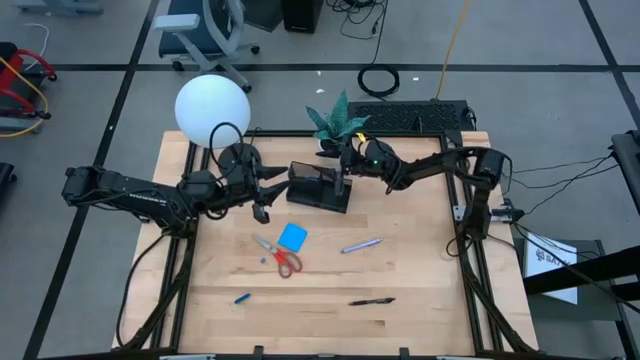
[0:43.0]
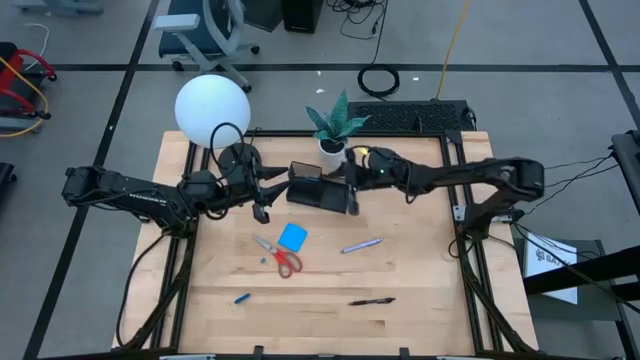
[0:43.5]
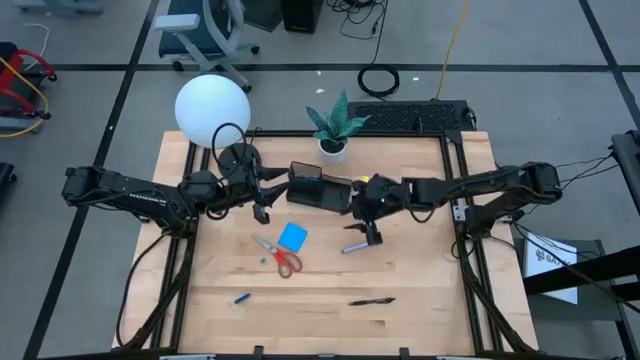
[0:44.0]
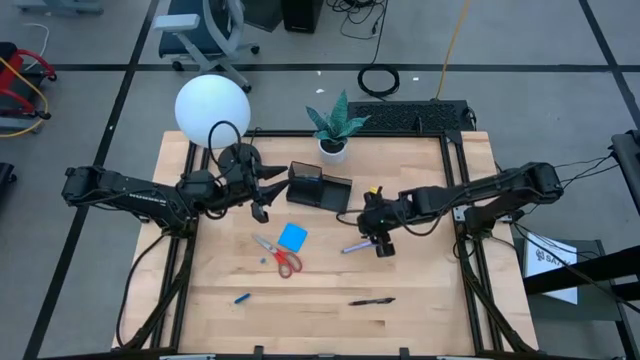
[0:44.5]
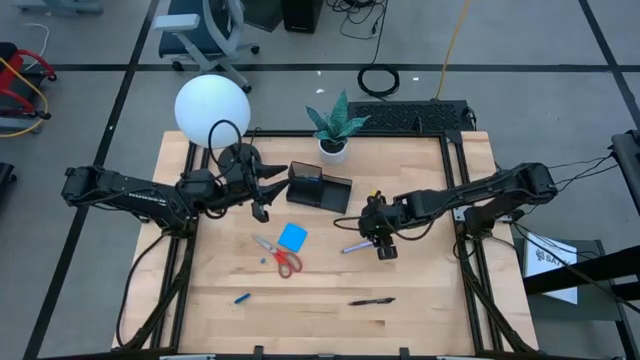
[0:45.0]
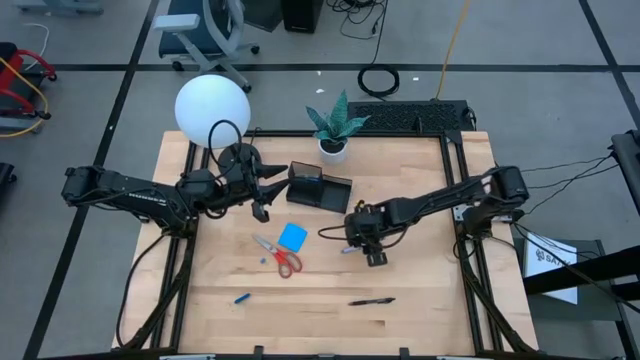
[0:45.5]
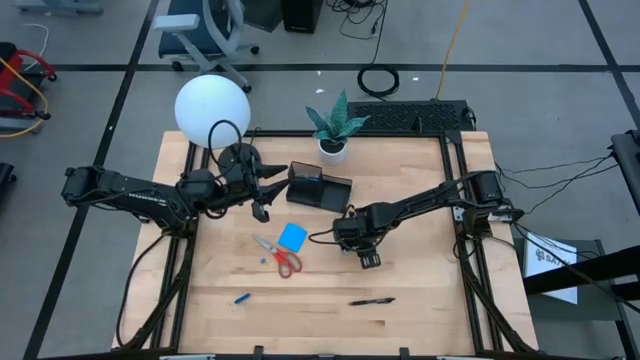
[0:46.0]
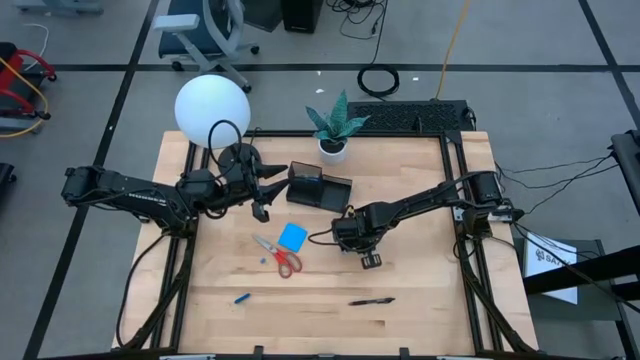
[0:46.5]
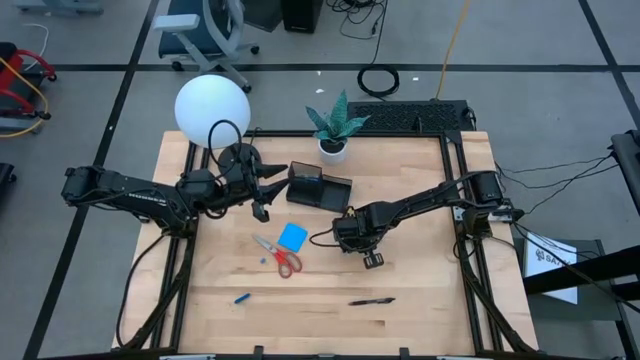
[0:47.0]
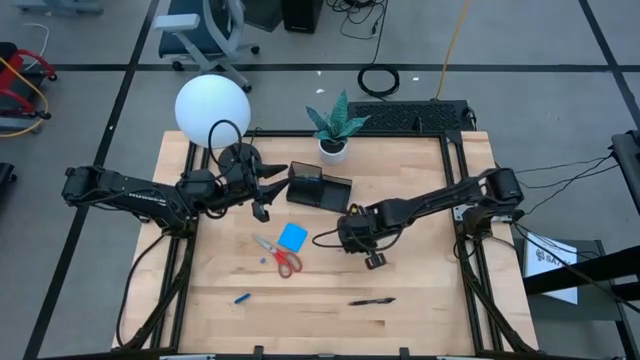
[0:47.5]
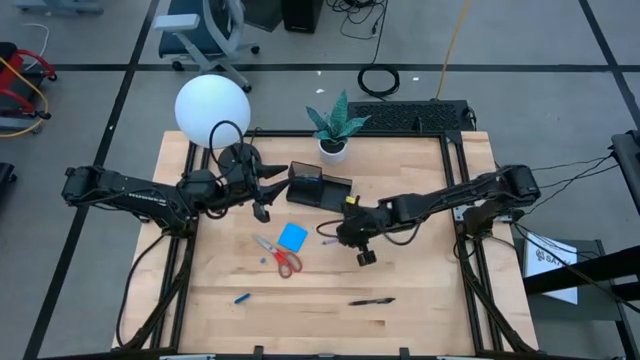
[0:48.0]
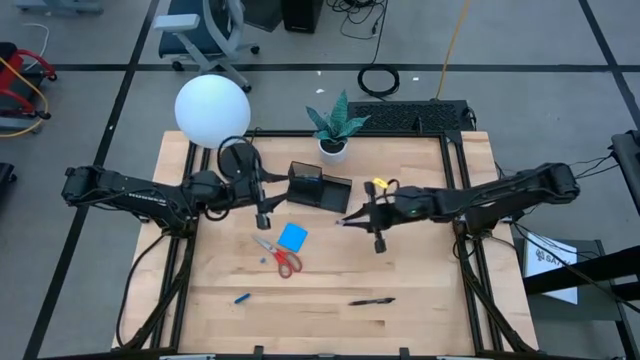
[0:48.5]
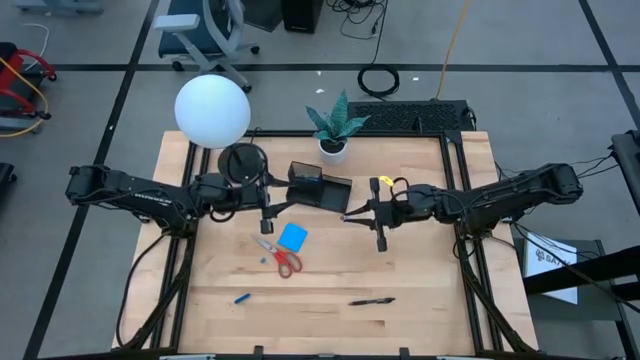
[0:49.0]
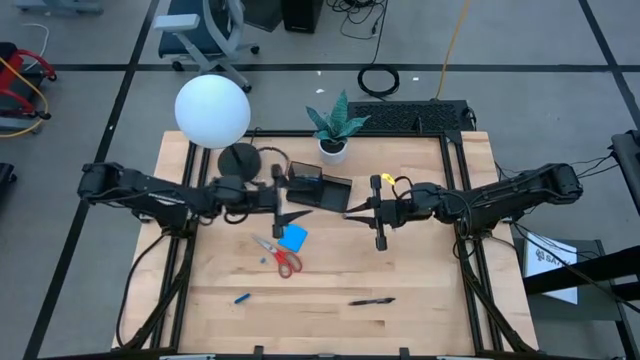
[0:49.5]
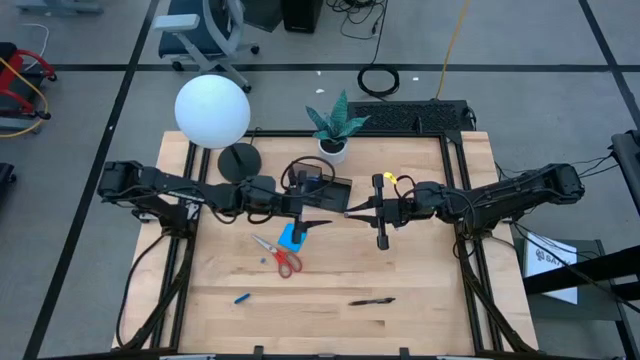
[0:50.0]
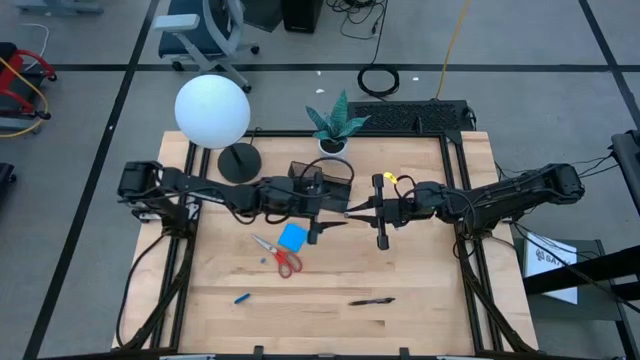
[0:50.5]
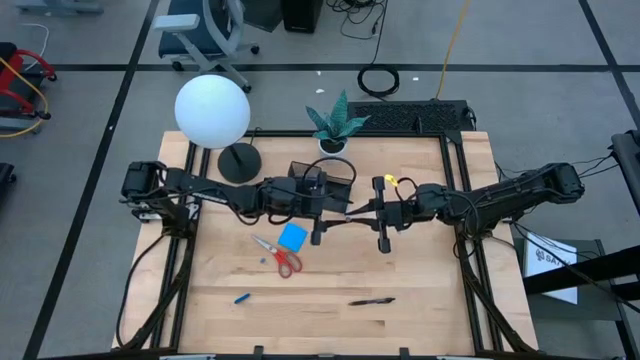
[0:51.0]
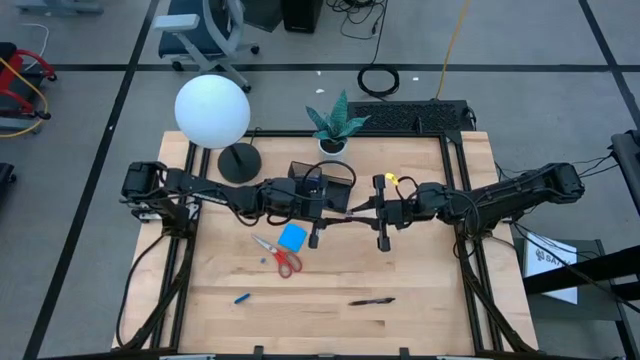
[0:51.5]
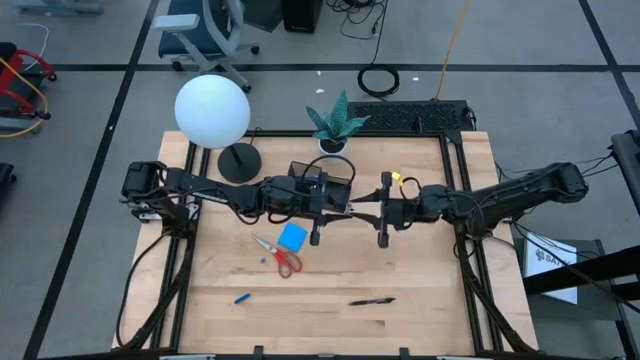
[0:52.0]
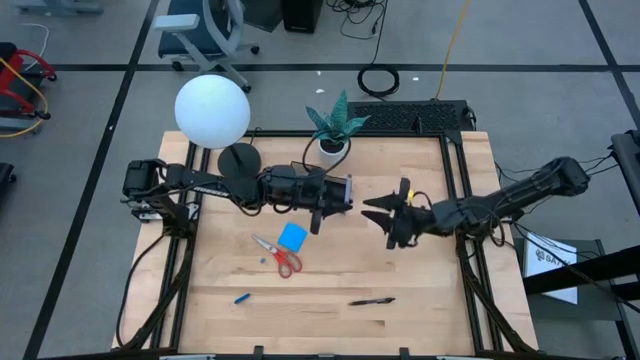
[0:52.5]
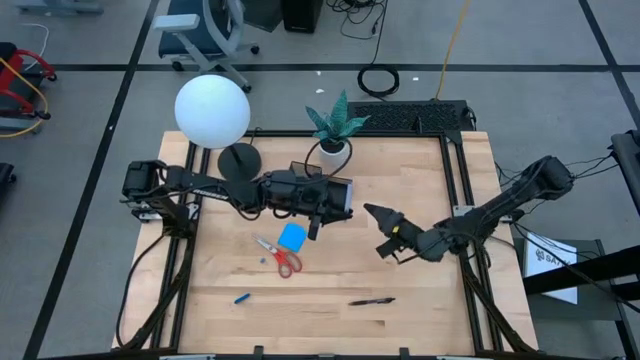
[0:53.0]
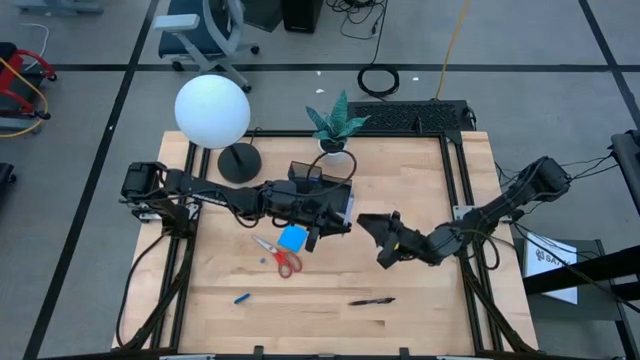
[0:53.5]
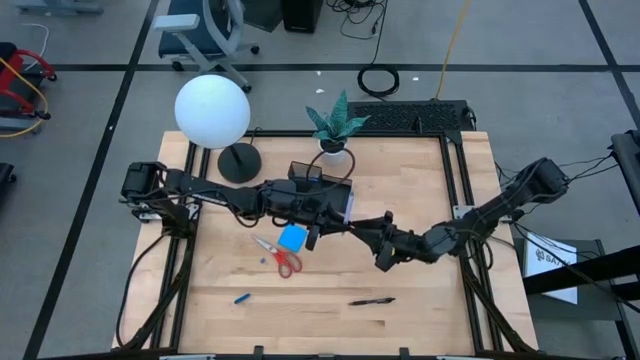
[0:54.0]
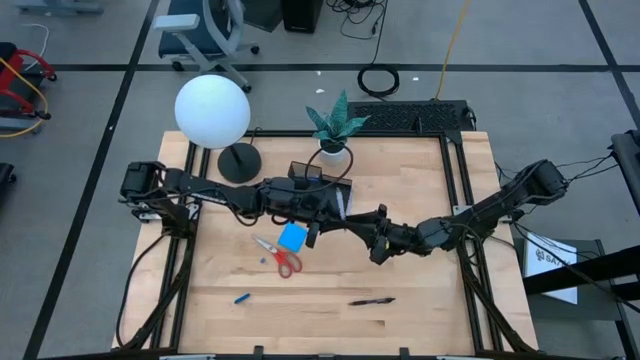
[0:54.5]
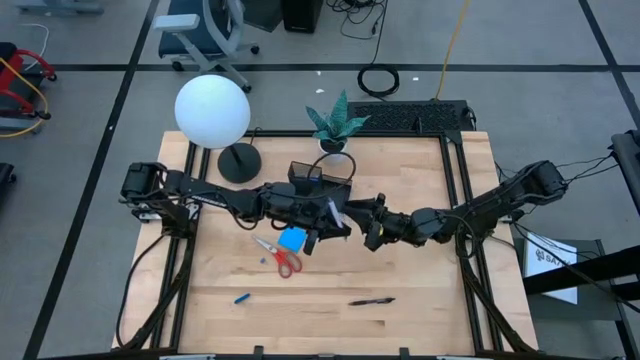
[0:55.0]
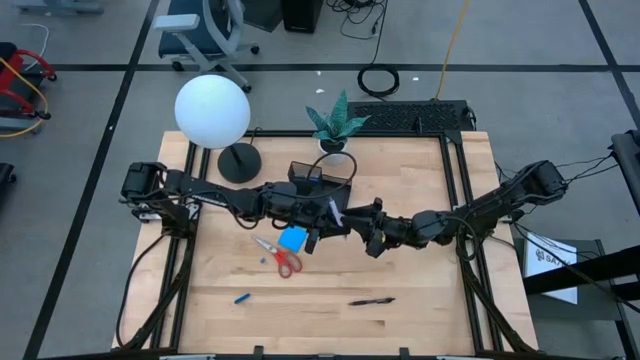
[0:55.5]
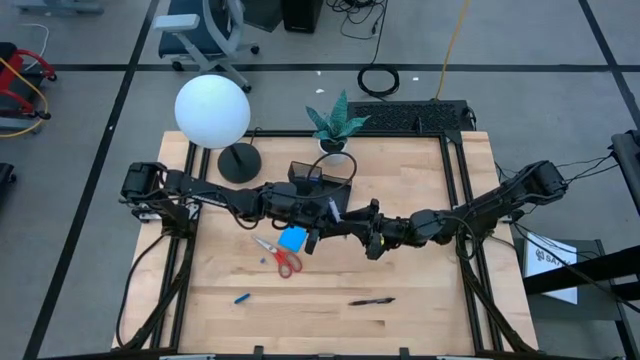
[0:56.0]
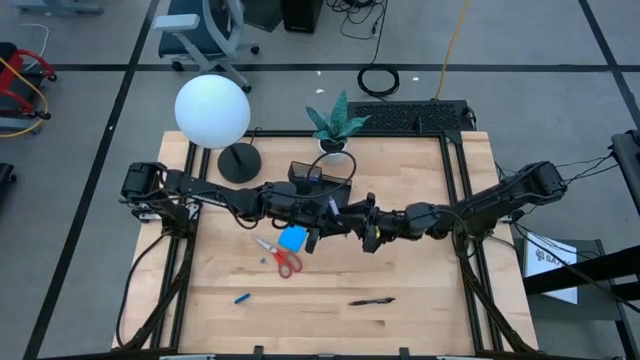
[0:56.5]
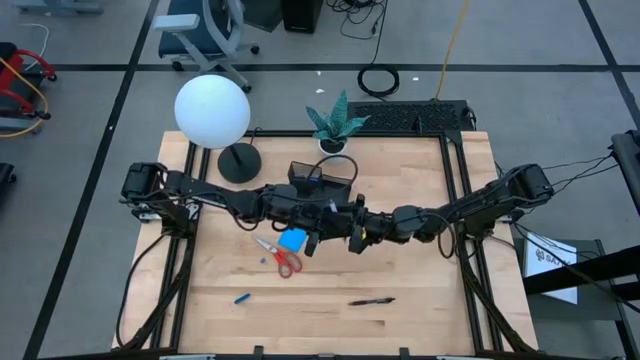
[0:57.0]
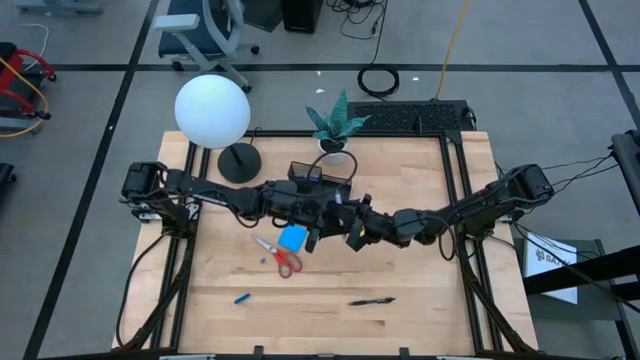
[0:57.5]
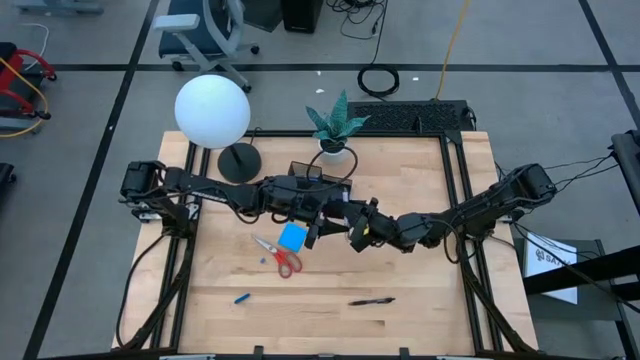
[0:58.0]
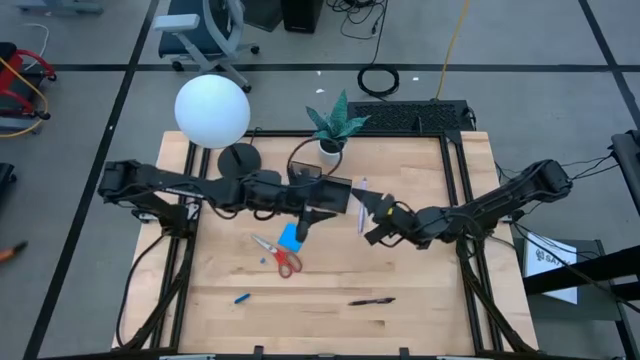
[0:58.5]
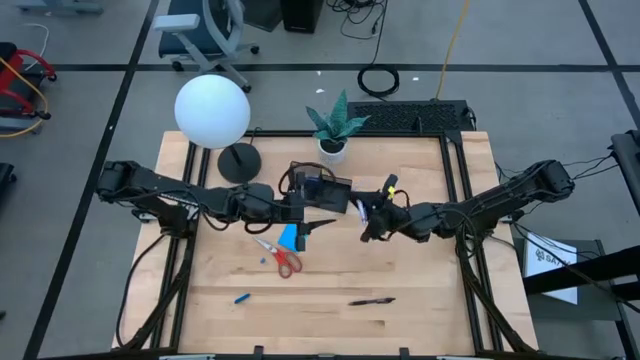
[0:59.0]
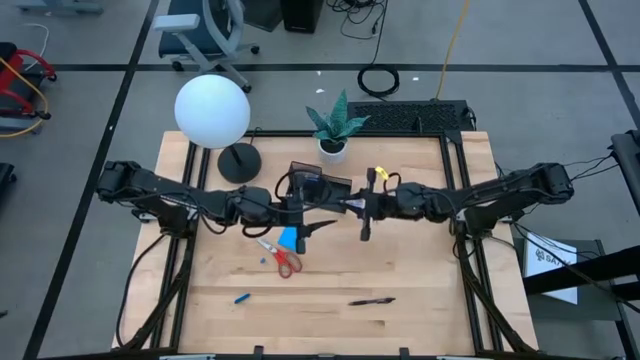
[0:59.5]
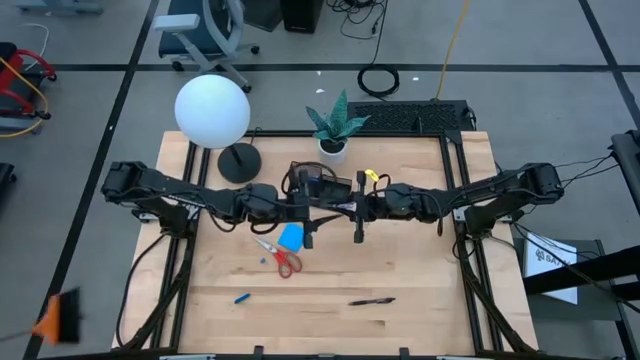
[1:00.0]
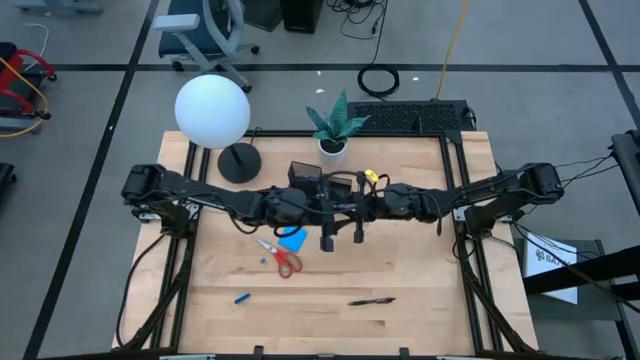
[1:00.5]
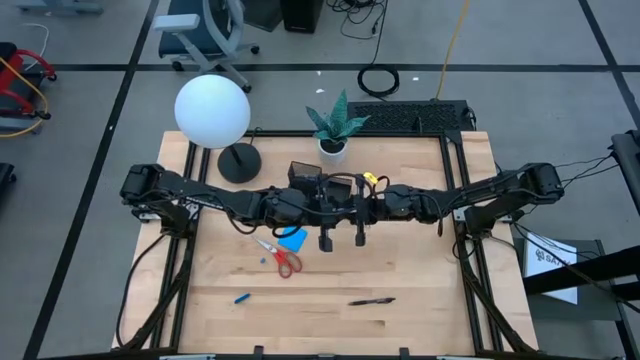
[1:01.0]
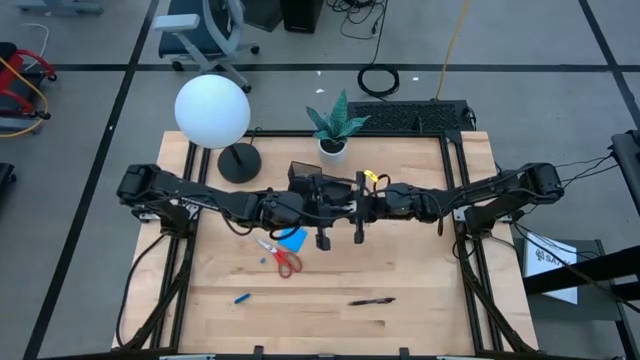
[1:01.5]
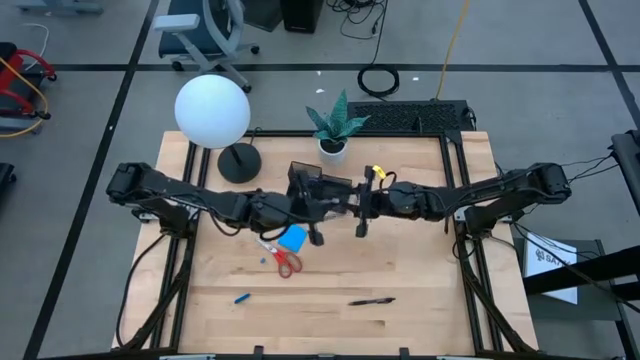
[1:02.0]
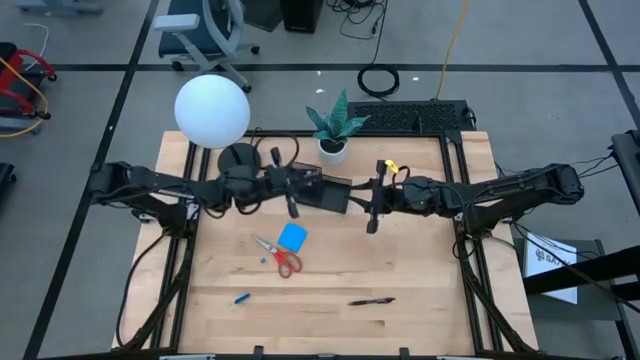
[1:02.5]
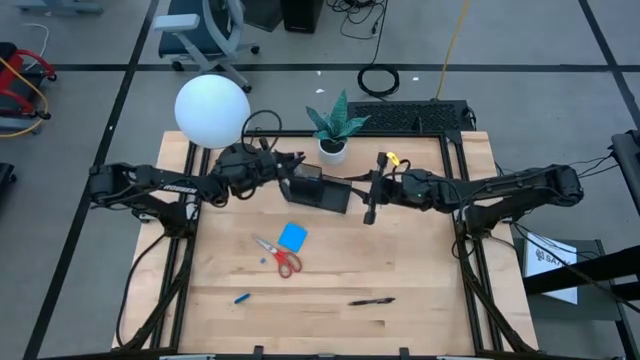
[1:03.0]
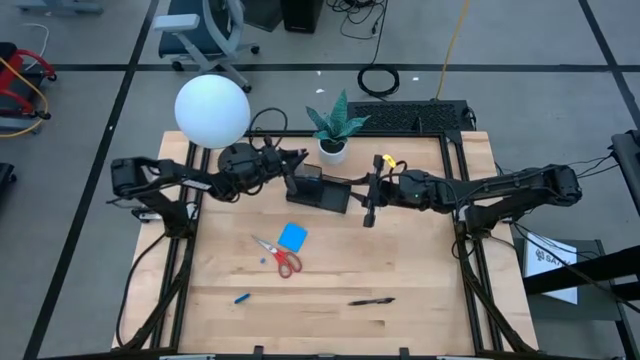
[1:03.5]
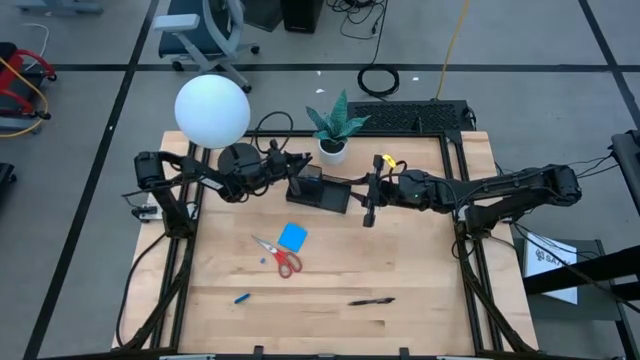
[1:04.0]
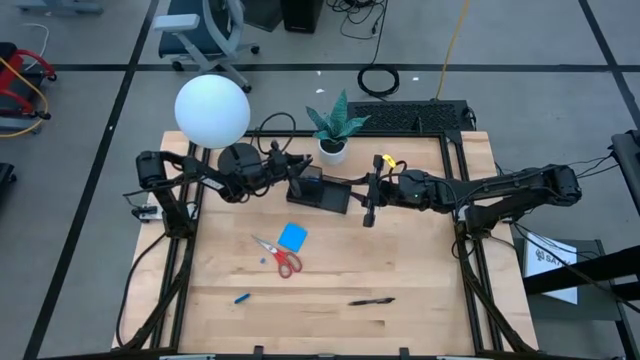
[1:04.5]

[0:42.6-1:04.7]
Task: Pick and place office supplies into organizer
Put the purple pen into the desk organizer

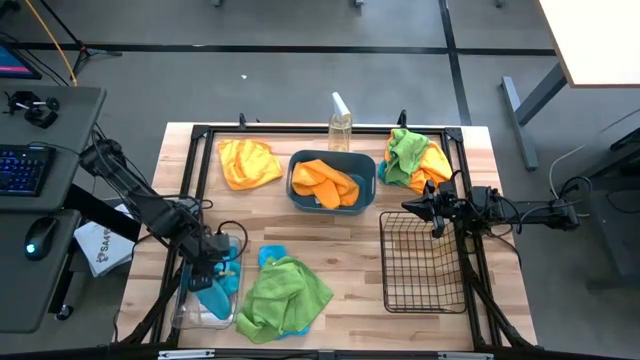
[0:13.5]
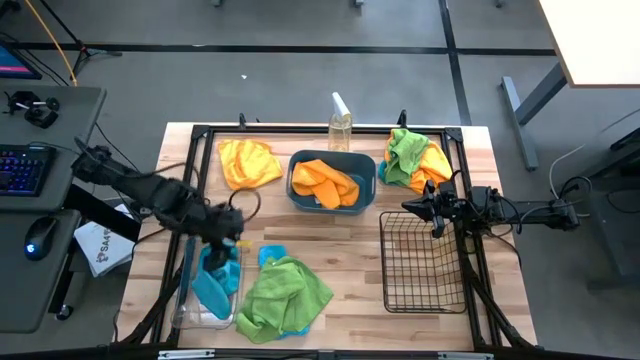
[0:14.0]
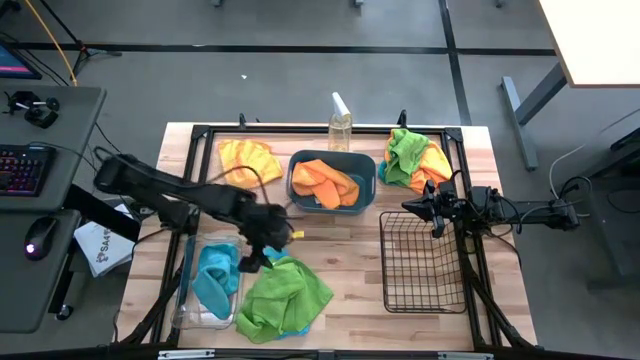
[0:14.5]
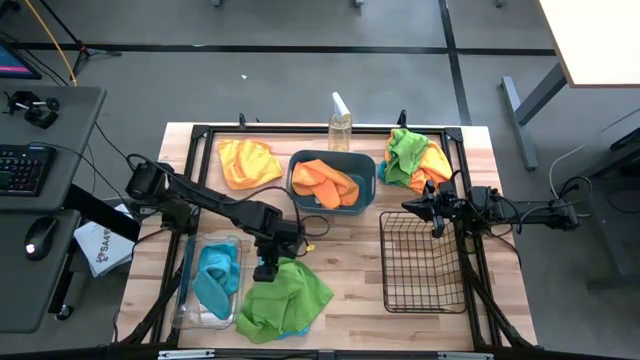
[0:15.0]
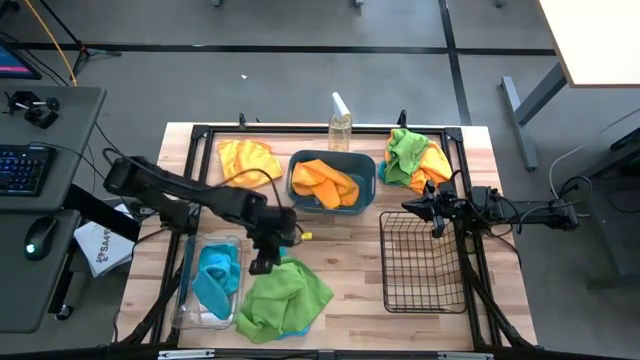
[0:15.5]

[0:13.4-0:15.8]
Task: Sort microfiber towel by color & place in baskets
Put the top green towel into the black wire basket
